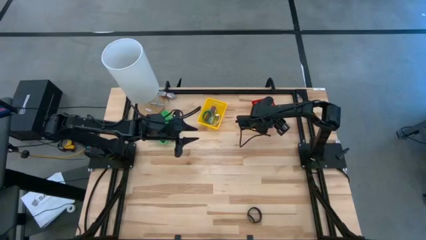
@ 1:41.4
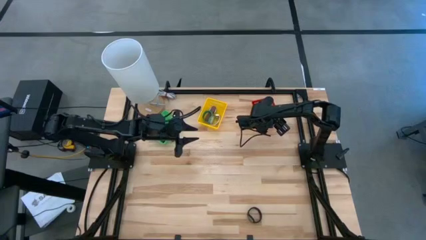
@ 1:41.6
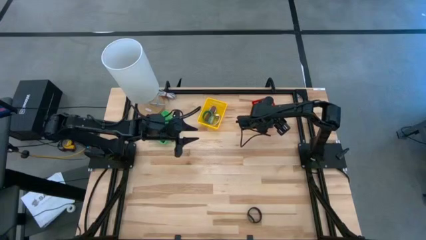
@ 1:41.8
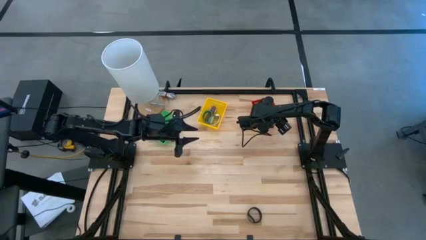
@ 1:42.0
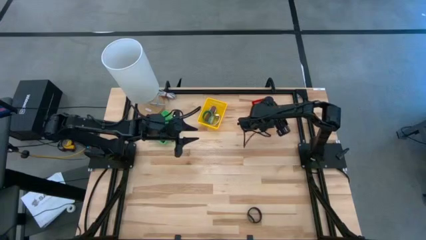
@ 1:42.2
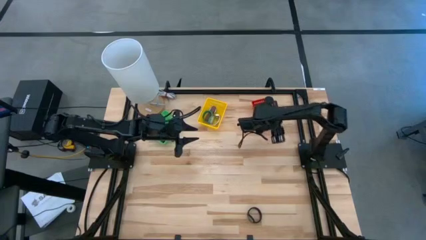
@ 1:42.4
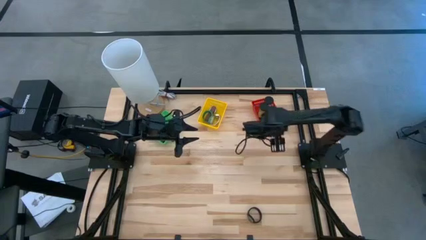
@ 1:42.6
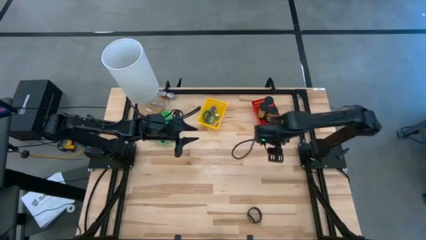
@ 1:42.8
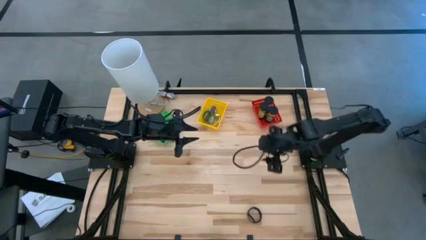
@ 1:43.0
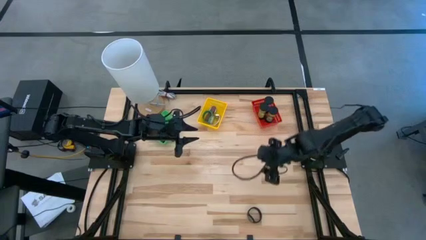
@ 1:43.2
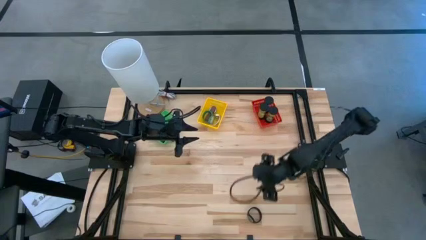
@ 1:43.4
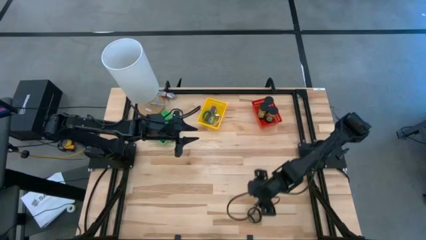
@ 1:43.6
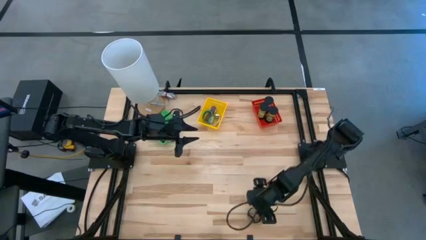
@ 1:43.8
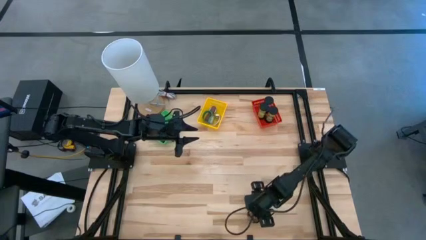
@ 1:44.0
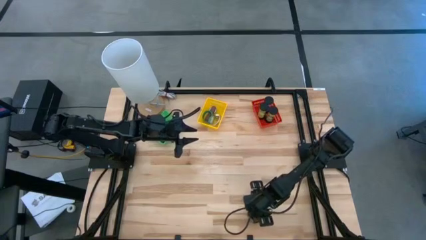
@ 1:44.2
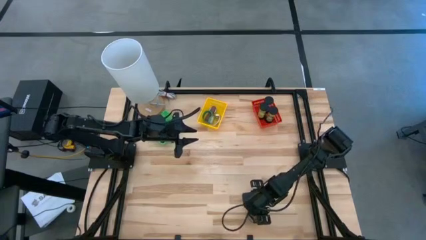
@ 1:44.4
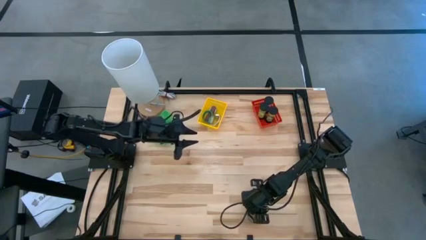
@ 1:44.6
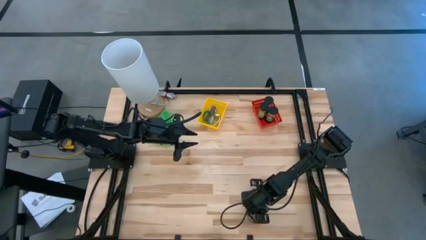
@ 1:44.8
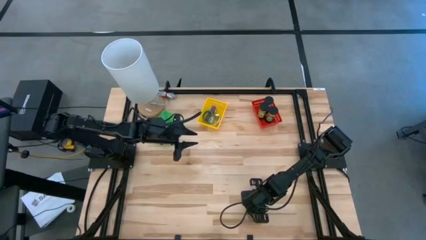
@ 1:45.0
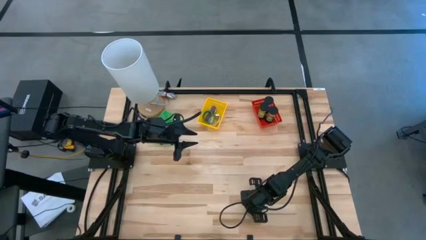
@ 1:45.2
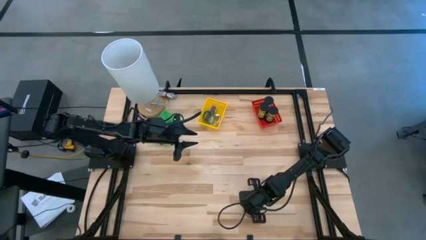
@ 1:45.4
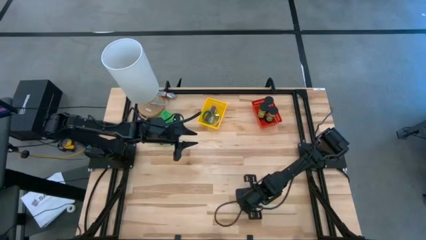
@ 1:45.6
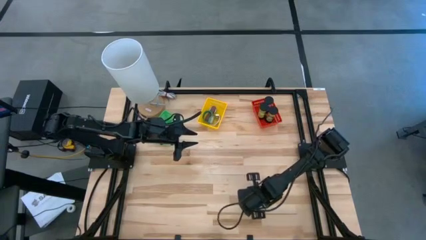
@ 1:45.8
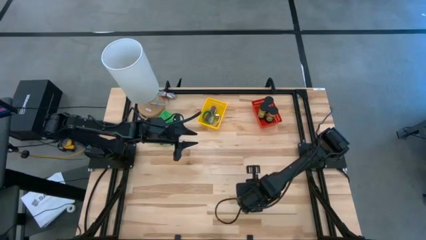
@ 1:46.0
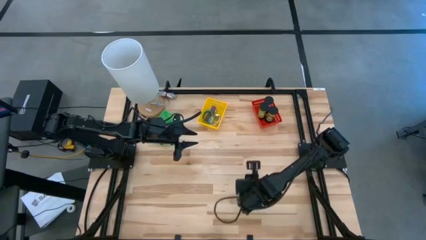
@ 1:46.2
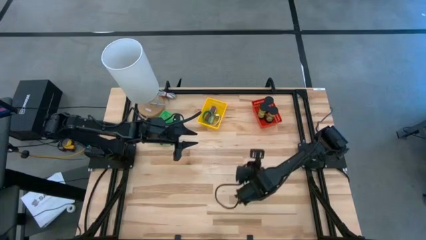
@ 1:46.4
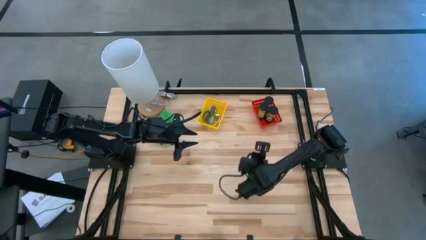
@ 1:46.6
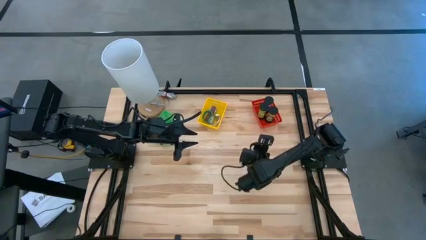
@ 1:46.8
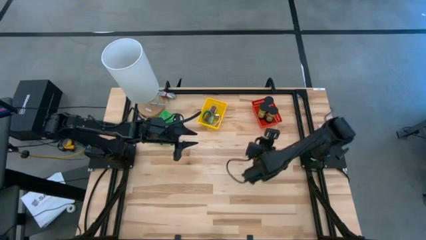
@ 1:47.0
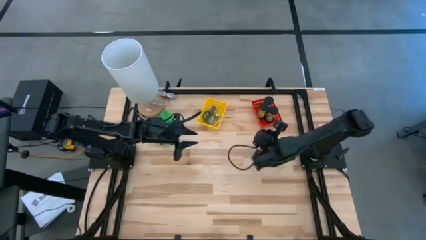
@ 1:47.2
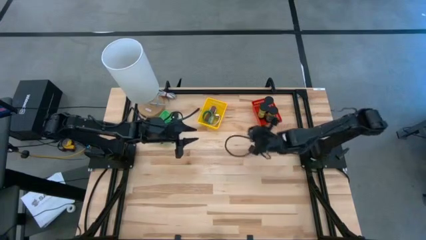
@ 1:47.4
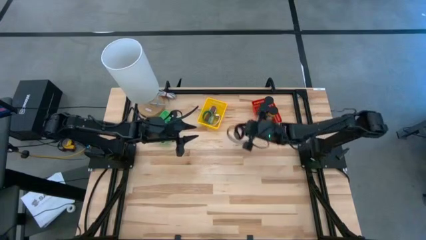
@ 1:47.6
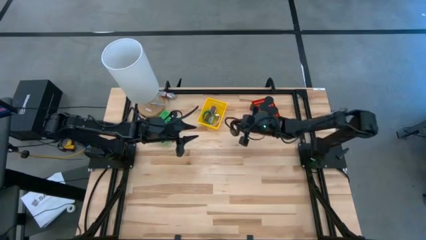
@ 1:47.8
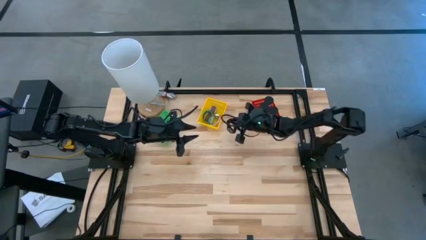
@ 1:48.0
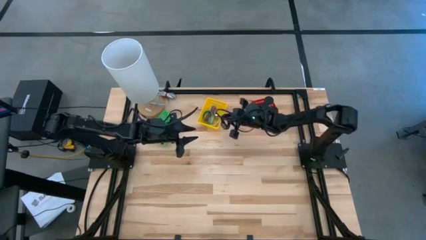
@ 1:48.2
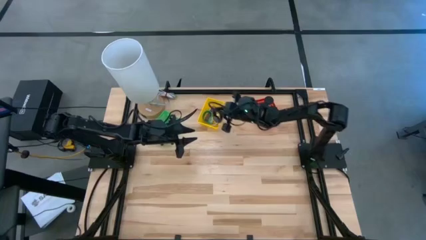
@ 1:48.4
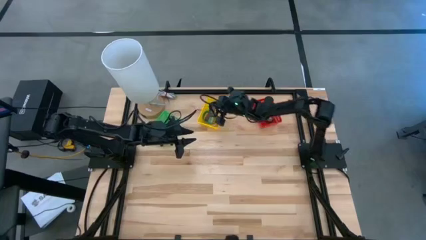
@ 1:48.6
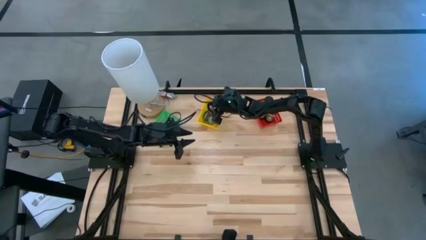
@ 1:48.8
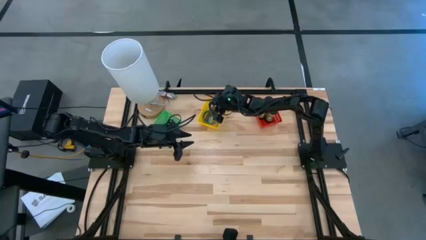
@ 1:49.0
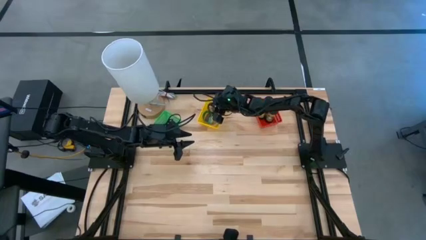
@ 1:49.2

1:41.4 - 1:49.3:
Task: Pick & Place Office items
Put the black watch into the yellow bin

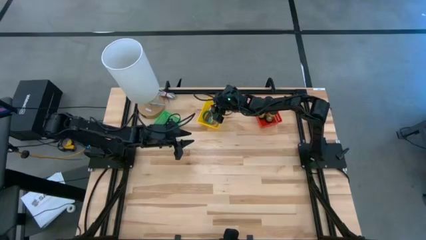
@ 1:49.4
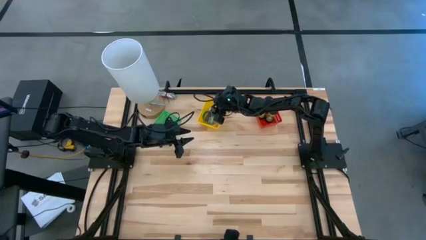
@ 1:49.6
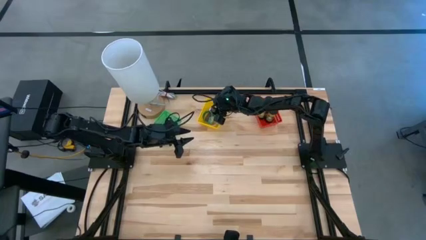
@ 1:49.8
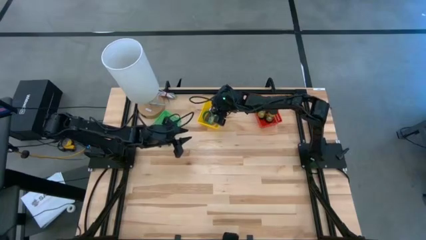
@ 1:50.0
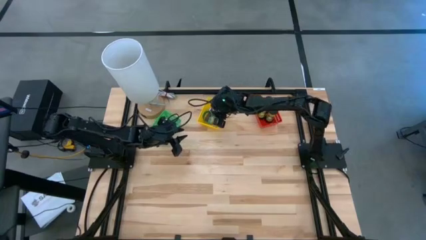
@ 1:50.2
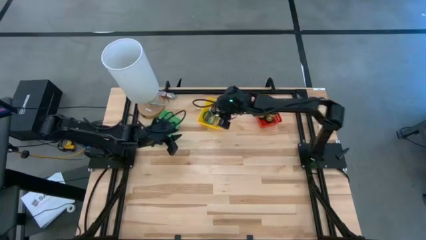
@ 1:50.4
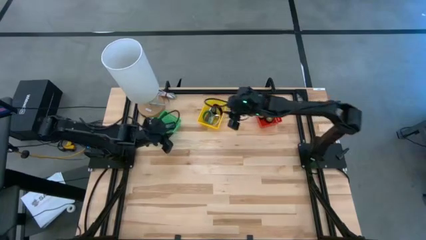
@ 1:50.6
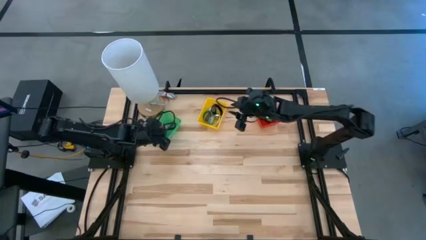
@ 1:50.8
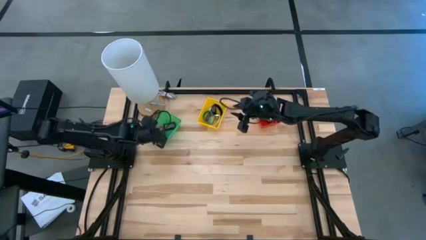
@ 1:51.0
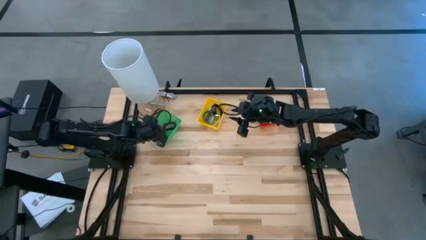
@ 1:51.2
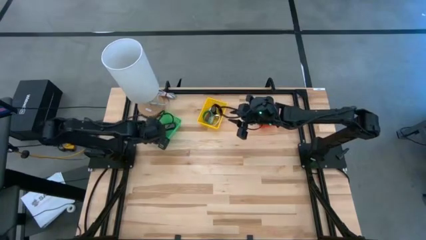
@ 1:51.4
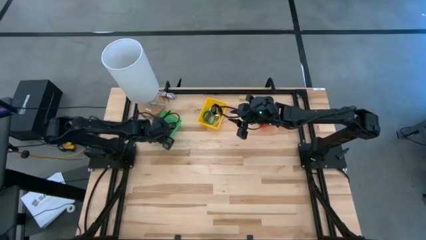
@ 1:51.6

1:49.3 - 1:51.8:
Adjust the bottom black timer in the green bin

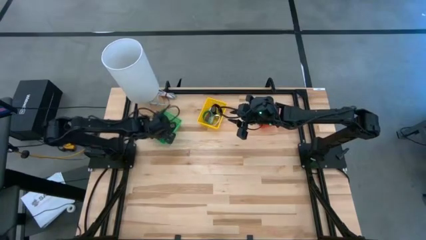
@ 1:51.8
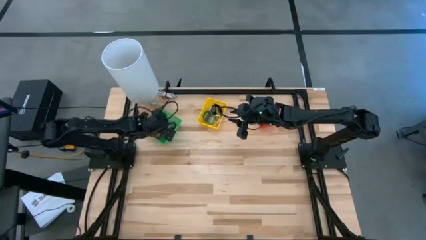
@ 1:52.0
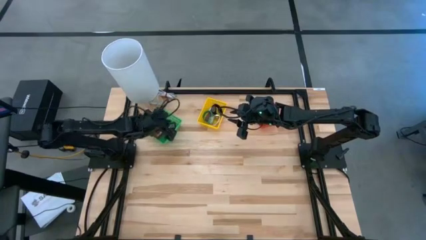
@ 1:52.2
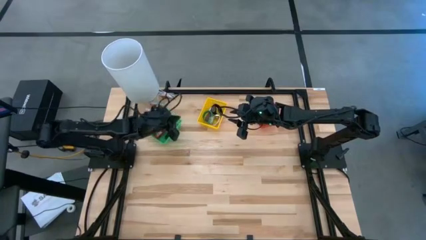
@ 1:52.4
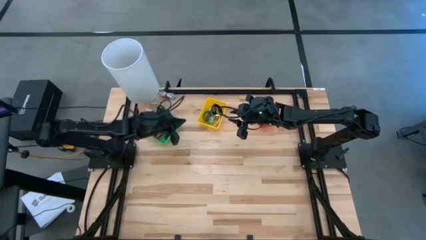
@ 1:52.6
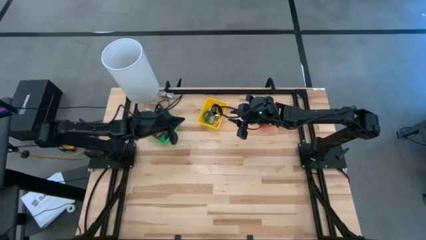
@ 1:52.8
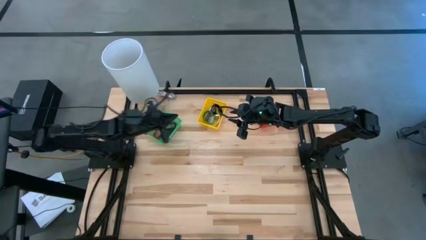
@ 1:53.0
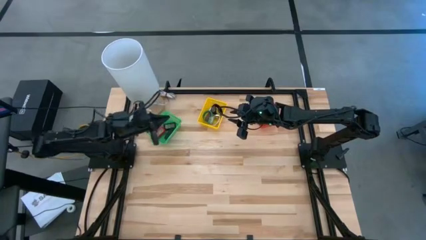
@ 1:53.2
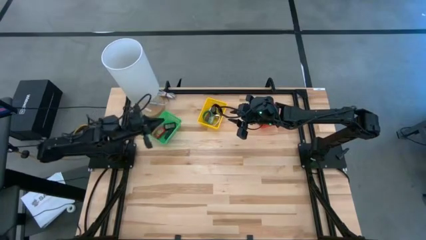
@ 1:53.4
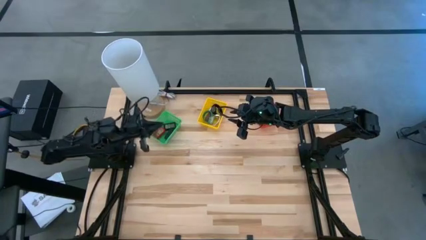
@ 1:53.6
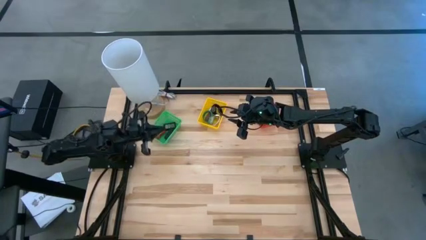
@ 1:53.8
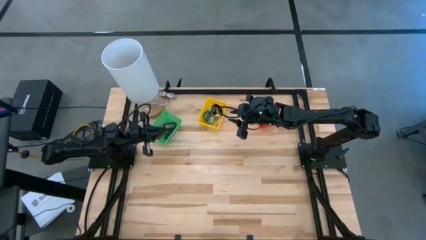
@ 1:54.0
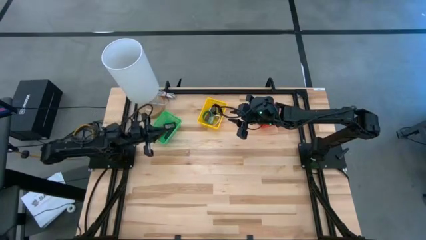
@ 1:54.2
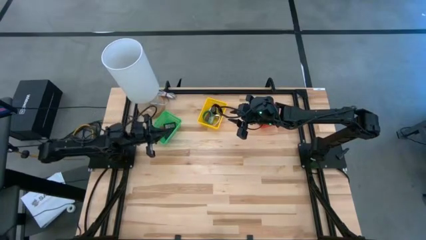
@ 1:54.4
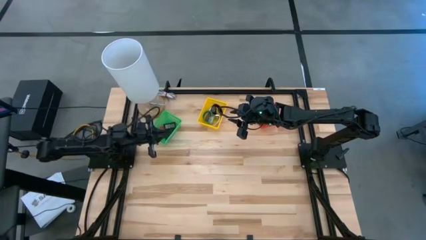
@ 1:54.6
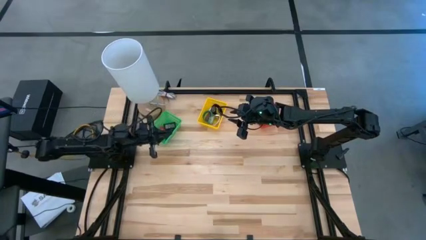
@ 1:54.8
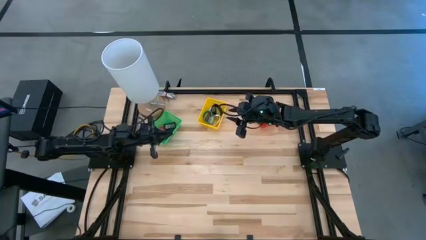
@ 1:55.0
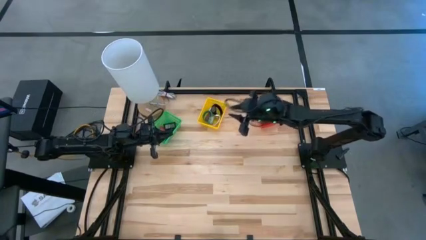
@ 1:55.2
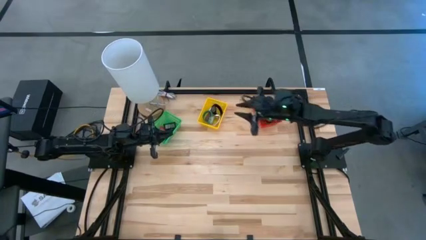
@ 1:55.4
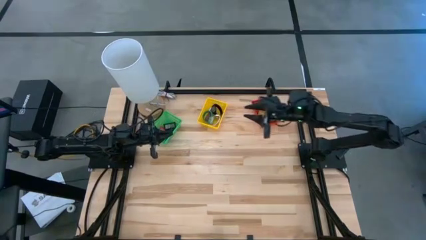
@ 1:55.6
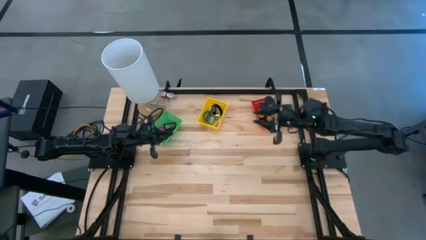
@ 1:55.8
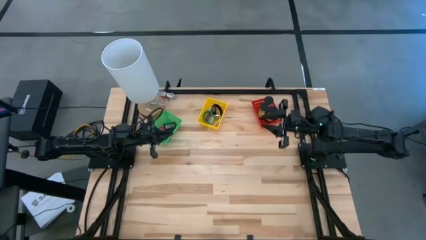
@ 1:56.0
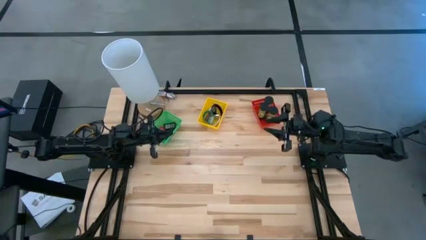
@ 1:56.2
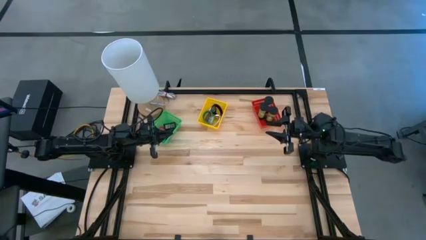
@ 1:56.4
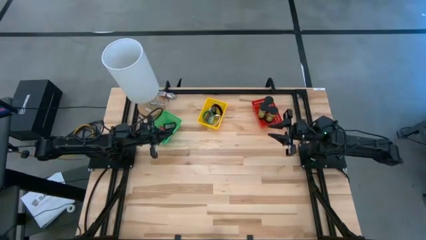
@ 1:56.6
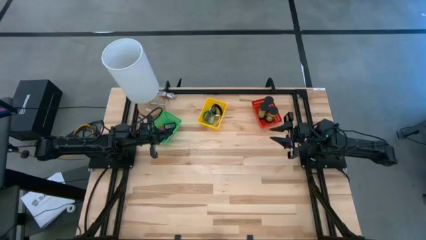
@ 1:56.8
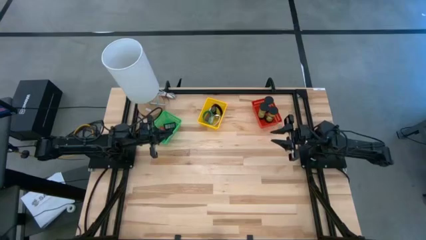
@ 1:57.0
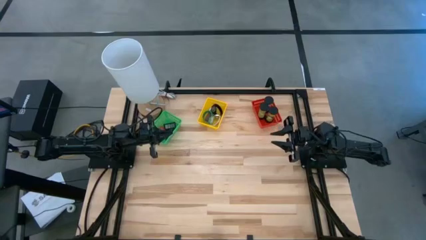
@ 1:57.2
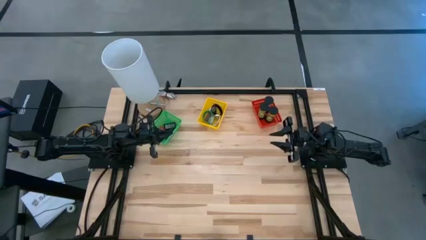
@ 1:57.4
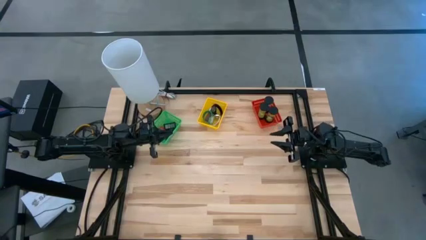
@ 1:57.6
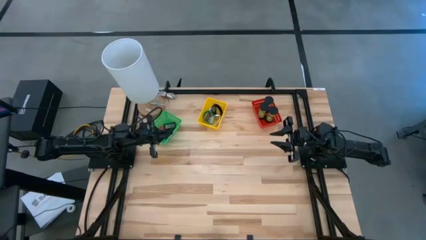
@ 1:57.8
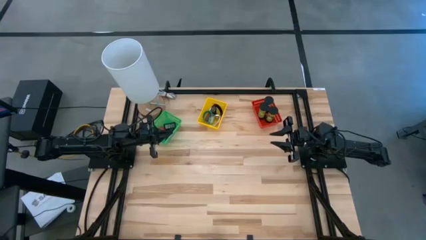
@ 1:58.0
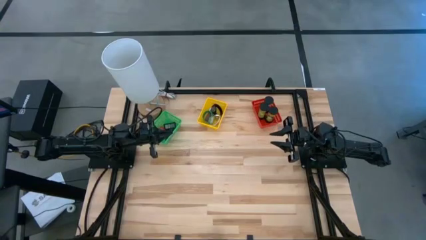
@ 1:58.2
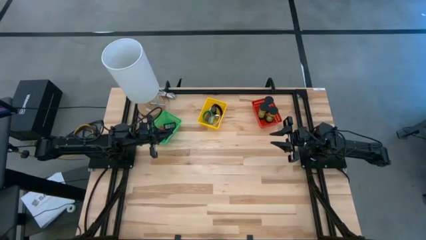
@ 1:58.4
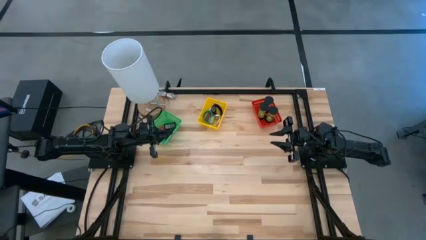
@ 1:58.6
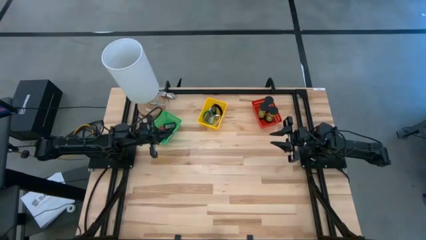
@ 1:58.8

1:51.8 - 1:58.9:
Return to Home Position
